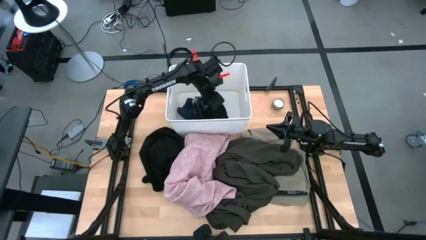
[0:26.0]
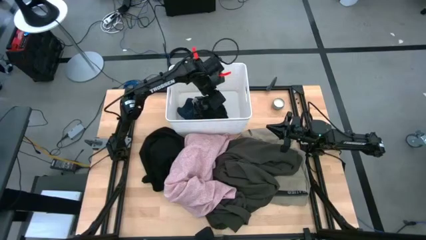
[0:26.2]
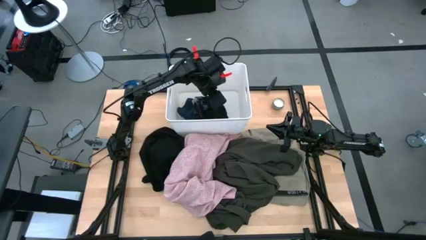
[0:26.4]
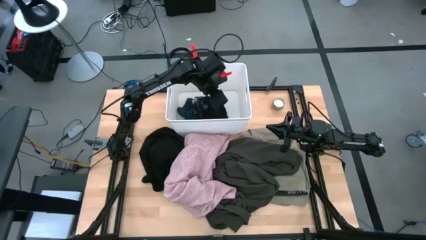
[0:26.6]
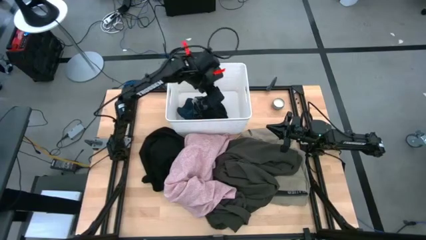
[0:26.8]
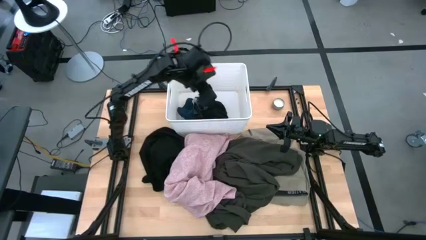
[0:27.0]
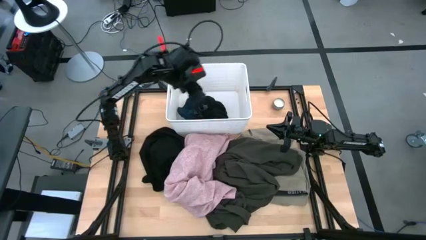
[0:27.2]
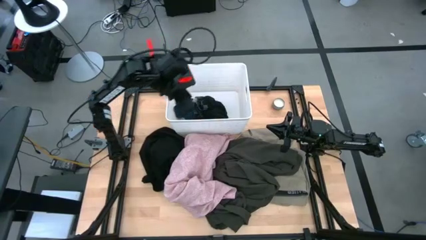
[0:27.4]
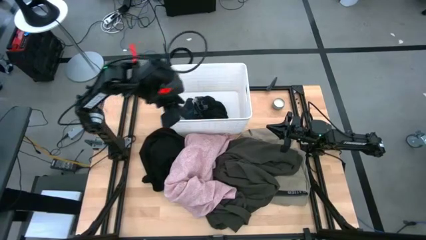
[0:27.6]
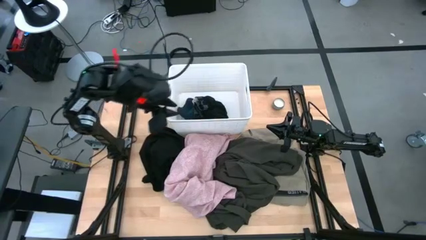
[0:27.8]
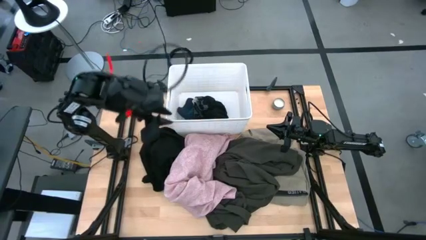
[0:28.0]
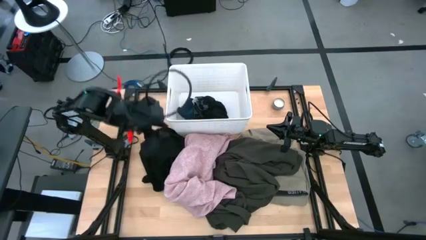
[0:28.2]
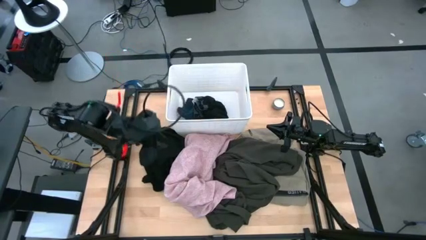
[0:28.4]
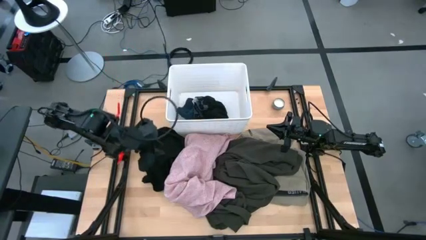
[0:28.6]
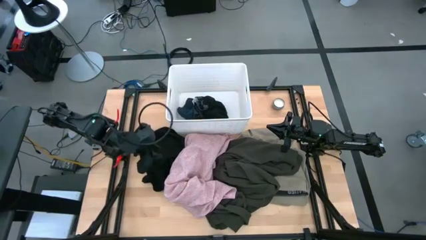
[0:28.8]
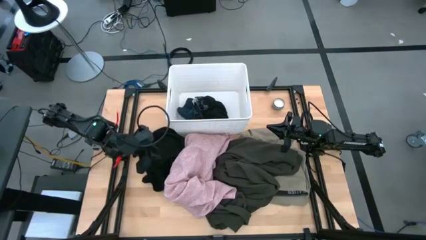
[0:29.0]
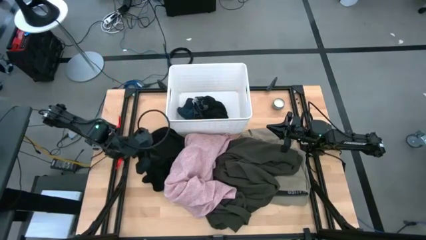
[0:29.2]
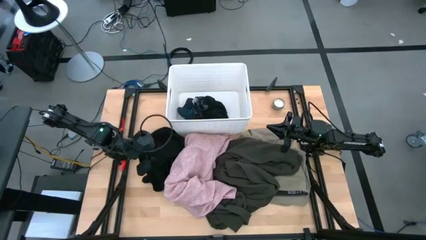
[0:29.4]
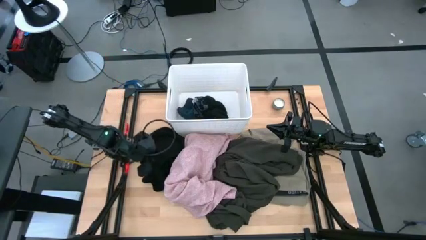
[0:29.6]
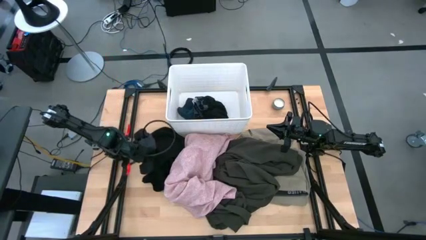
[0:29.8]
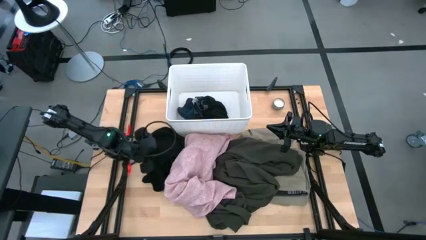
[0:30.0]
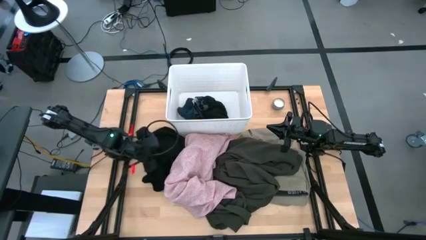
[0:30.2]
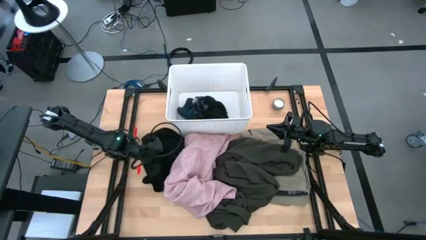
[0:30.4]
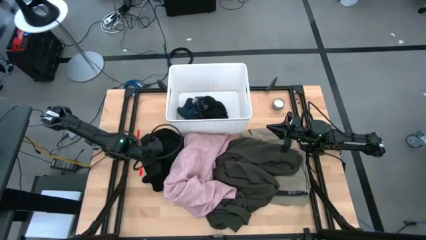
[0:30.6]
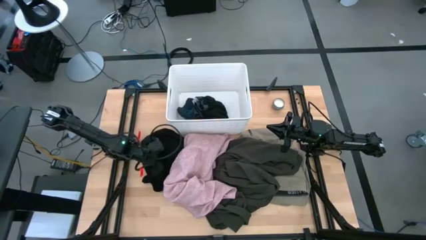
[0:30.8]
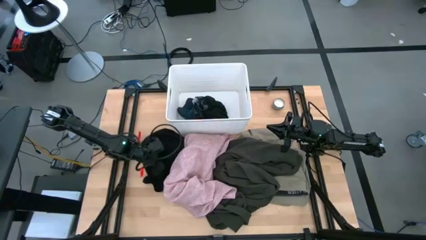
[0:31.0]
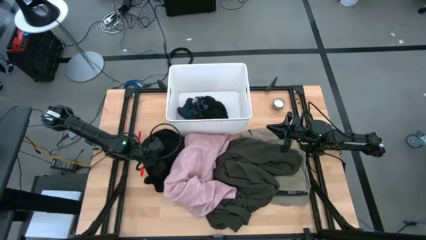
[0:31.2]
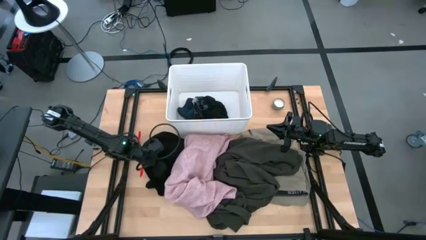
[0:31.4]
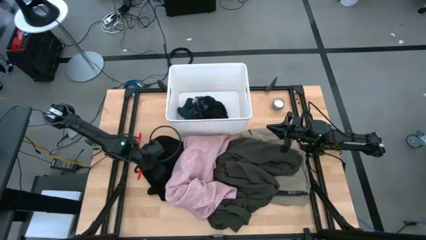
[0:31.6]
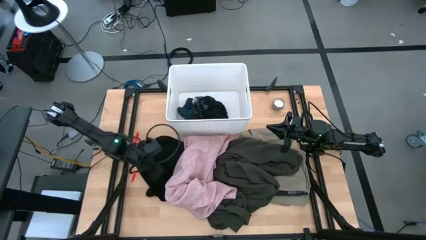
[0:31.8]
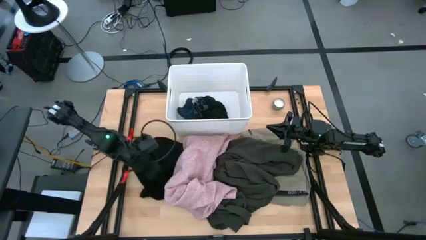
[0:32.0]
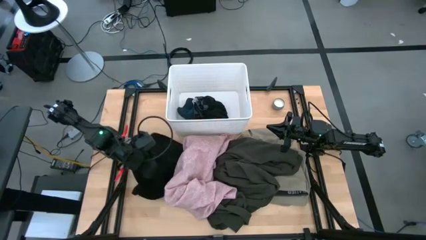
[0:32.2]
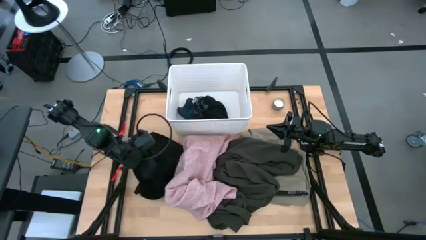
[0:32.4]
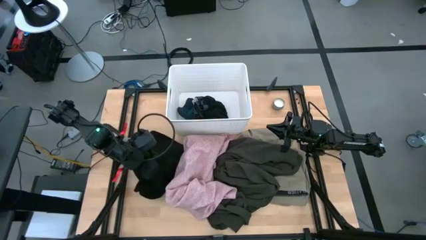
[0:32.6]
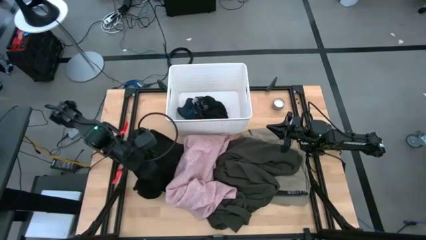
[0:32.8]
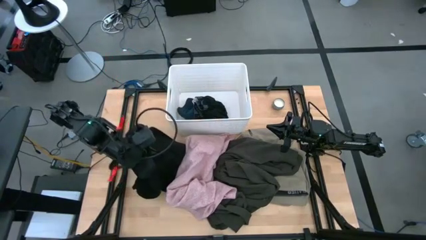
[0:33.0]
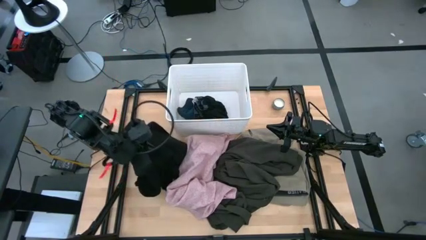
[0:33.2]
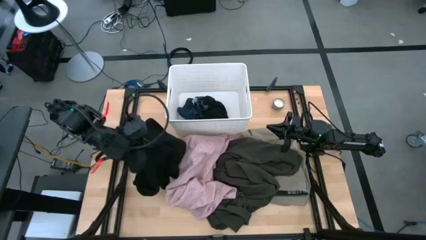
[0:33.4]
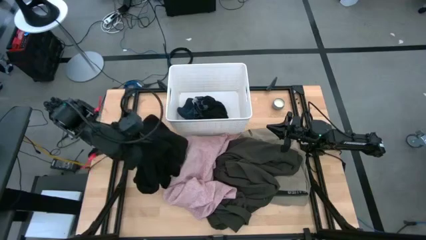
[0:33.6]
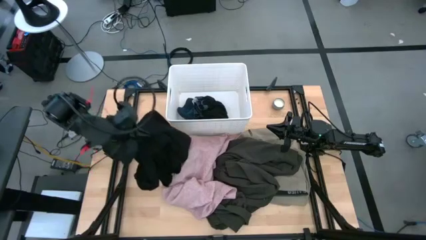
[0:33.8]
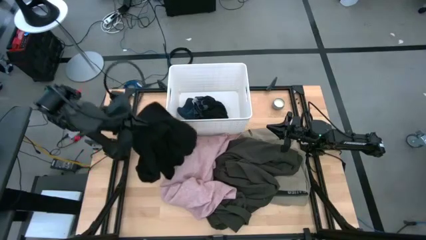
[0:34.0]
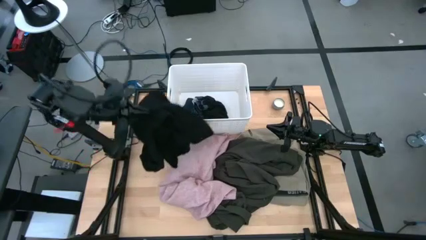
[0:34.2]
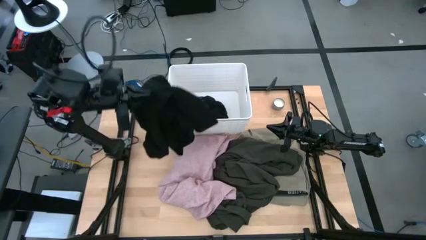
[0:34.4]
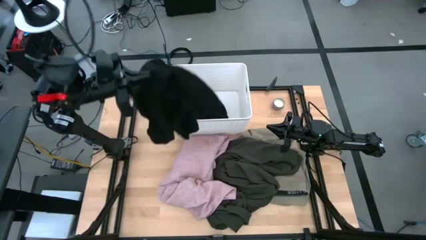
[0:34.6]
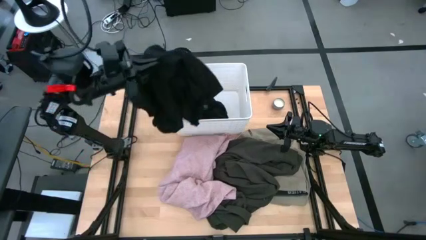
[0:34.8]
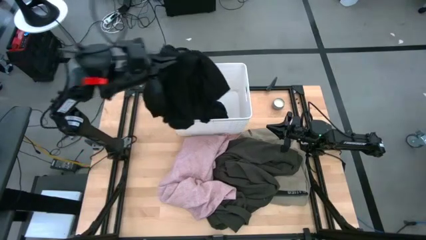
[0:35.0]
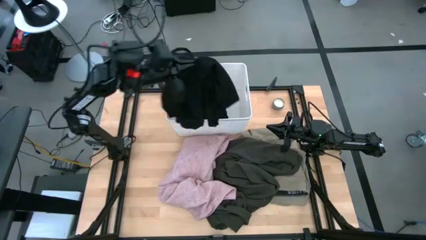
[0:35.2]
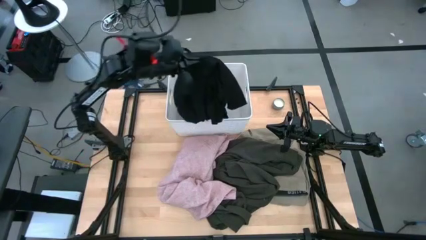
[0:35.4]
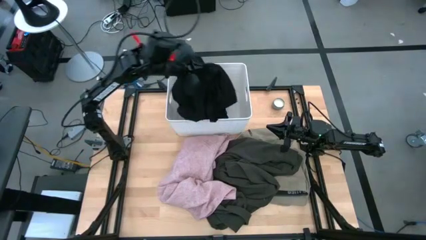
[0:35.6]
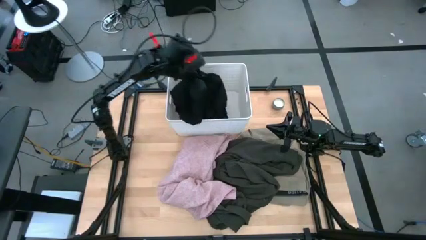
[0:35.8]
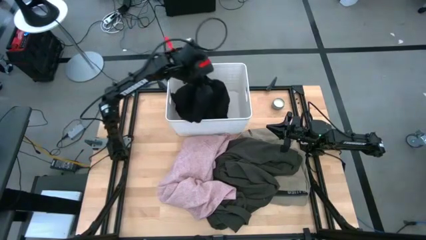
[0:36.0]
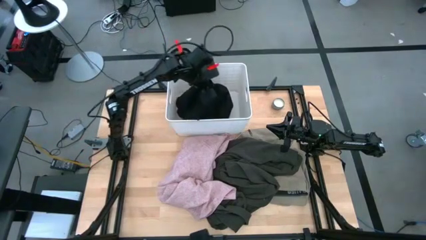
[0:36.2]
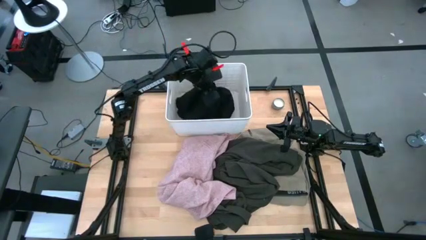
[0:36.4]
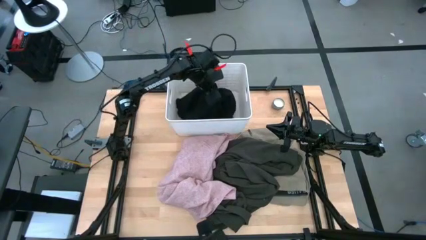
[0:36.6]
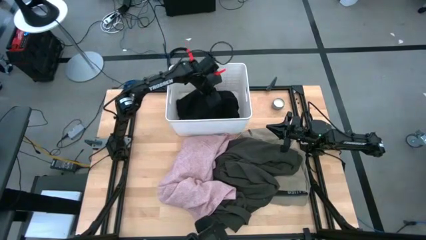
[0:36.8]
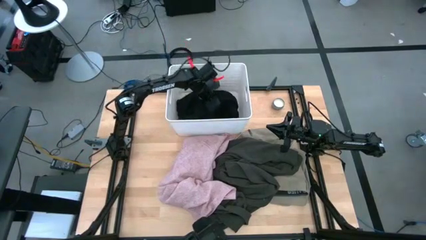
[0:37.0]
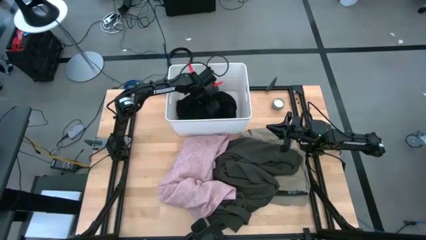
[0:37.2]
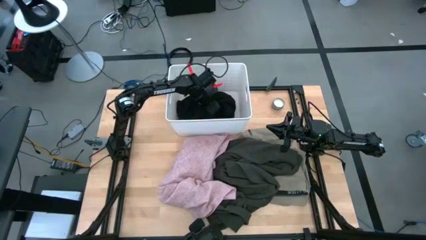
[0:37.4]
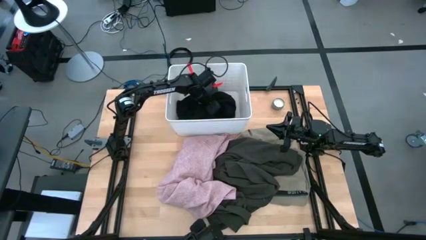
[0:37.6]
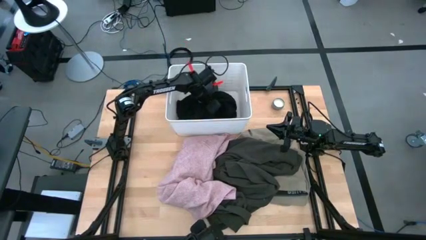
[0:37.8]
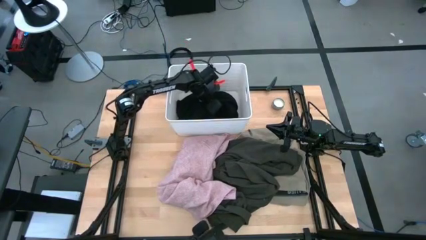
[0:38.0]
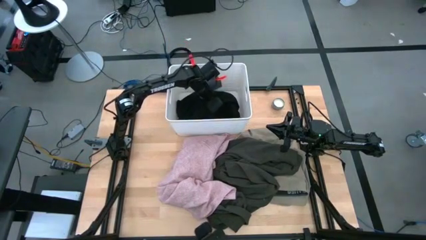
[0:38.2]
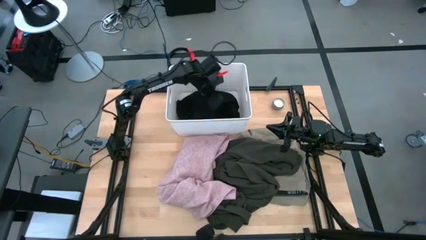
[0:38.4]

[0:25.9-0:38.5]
Task: Sort clothes
Put the black shirt into the white laundry organizer

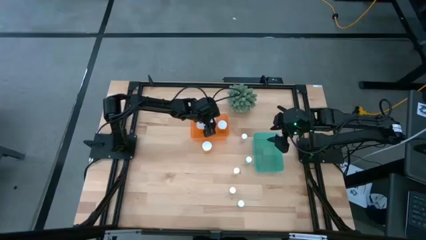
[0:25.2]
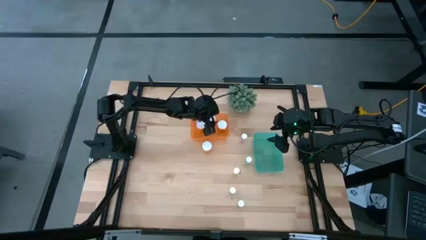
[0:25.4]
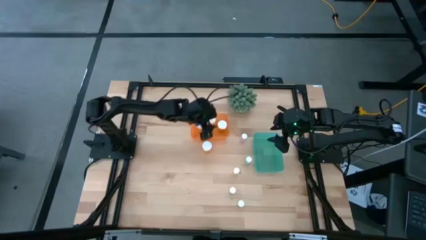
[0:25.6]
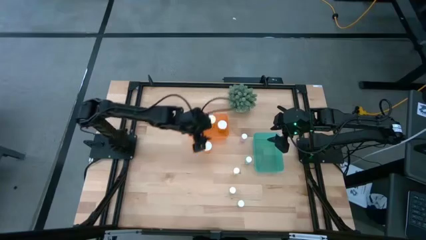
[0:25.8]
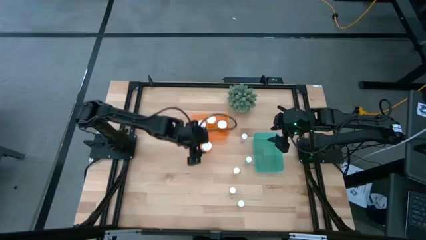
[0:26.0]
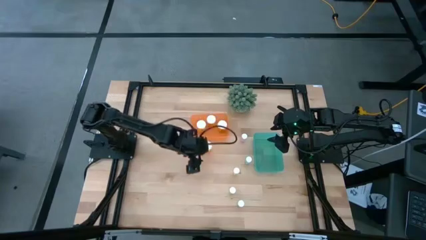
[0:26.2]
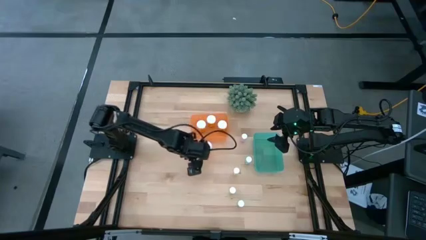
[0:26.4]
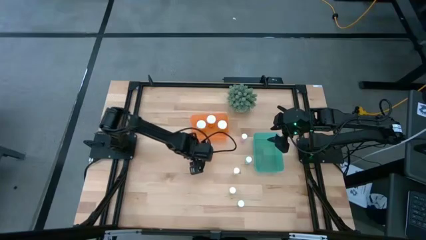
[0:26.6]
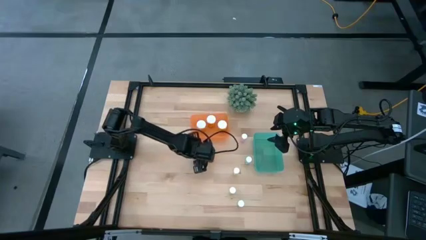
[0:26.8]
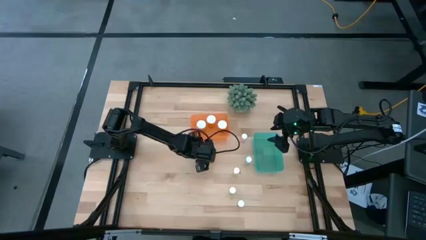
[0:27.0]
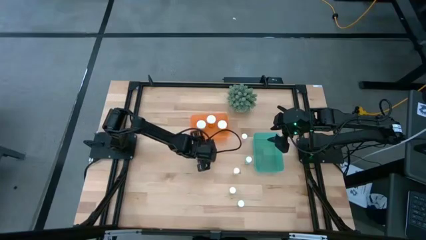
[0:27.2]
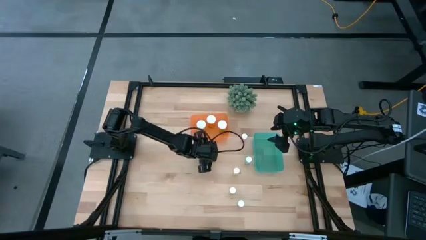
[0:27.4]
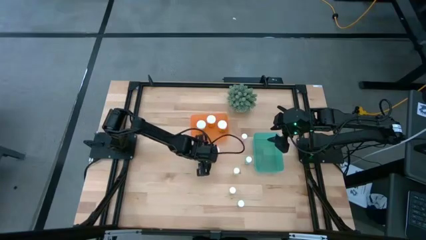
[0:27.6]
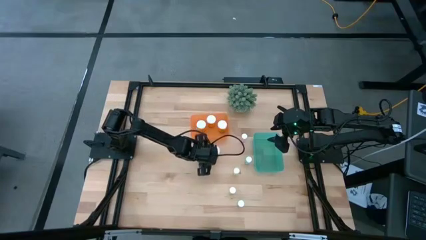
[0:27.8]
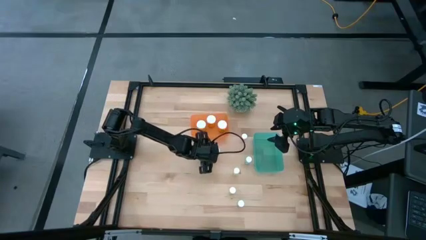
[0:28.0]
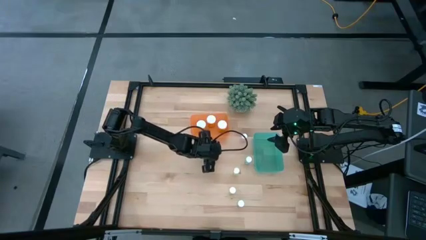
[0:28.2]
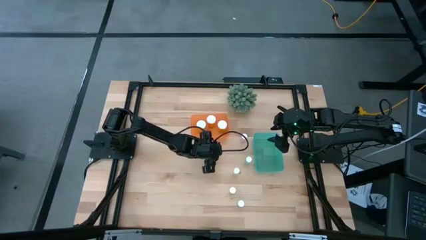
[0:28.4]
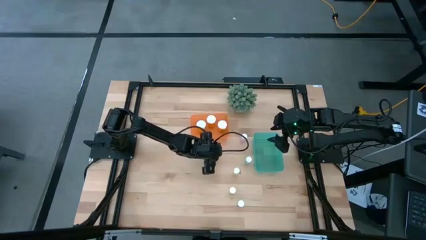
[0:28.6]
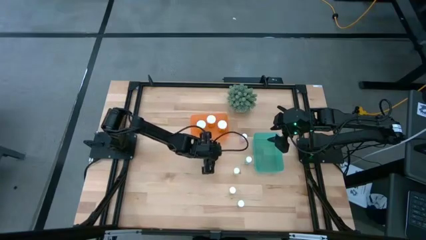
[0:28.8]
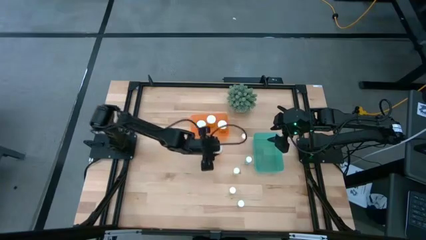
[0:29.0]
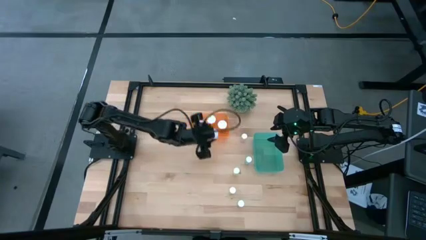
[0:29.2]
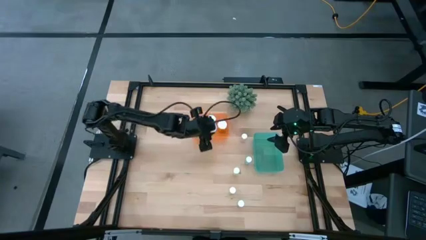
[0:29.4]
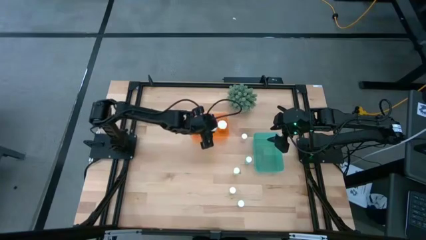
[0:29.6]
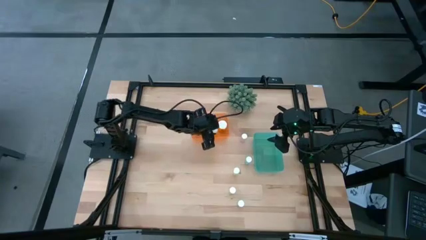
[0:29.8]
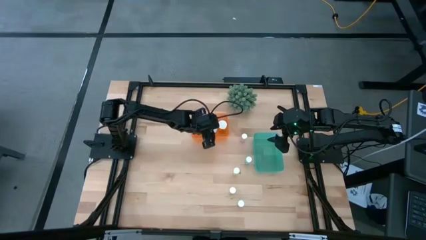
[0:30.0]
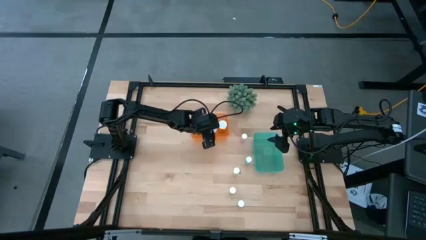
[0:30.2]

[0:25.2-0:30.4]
Task: Pick and place medicine bottles into bin by pill shape (circle, oval)
Put the orange pill bottle into the orange bin
